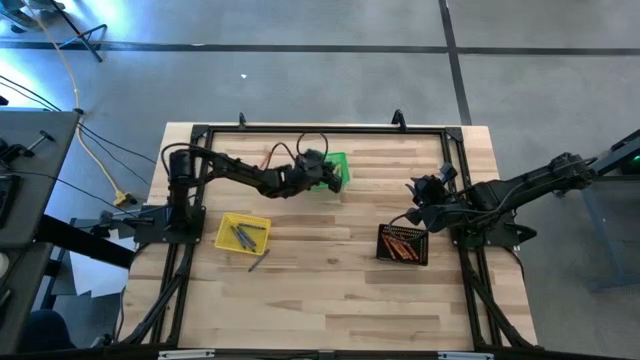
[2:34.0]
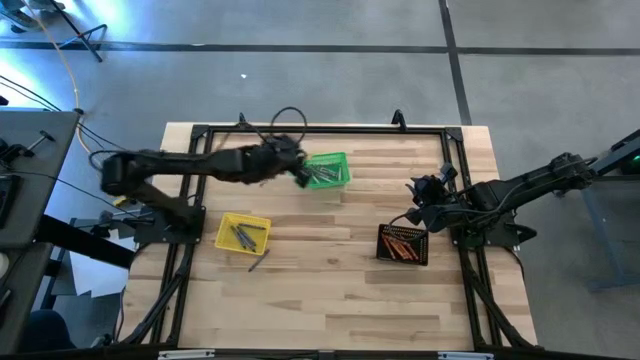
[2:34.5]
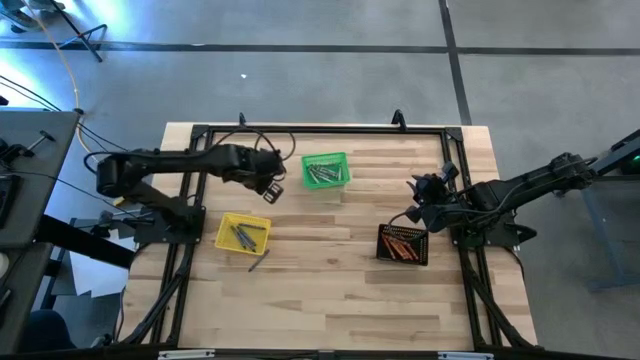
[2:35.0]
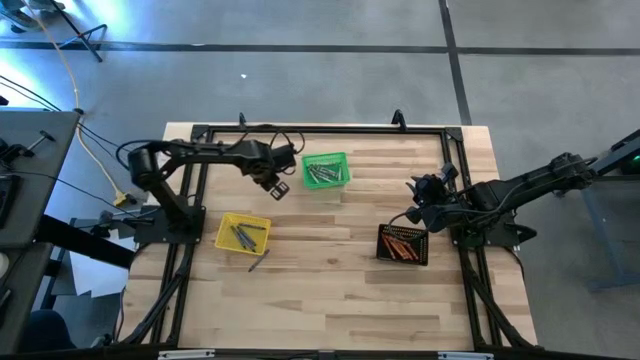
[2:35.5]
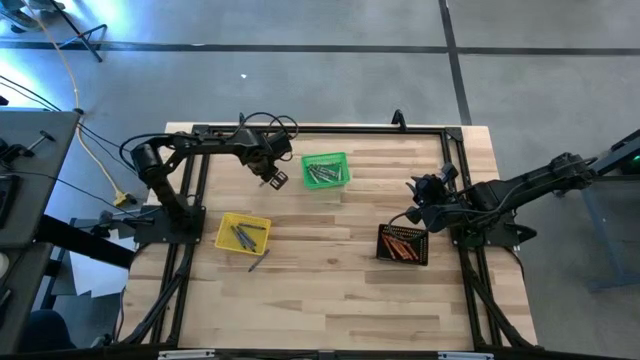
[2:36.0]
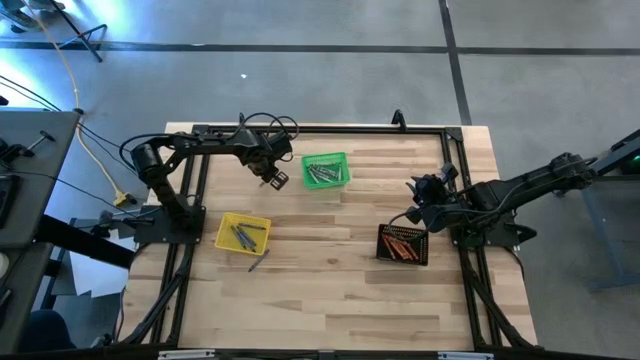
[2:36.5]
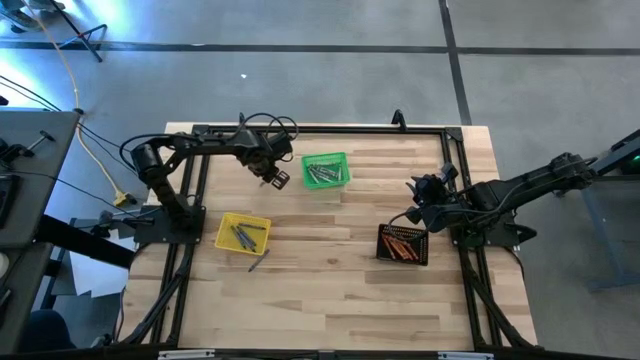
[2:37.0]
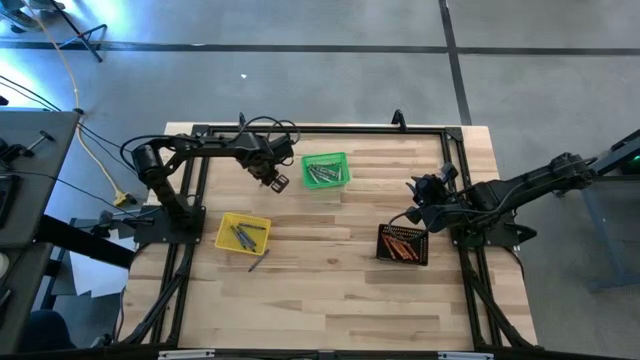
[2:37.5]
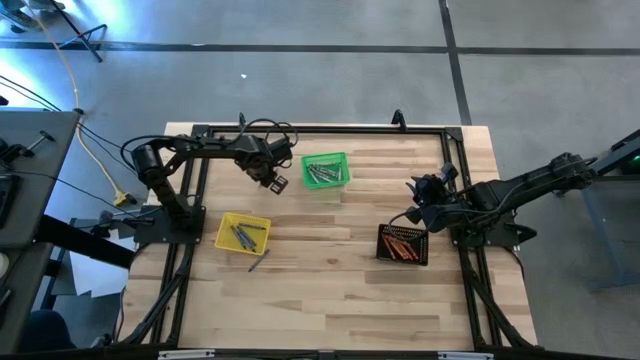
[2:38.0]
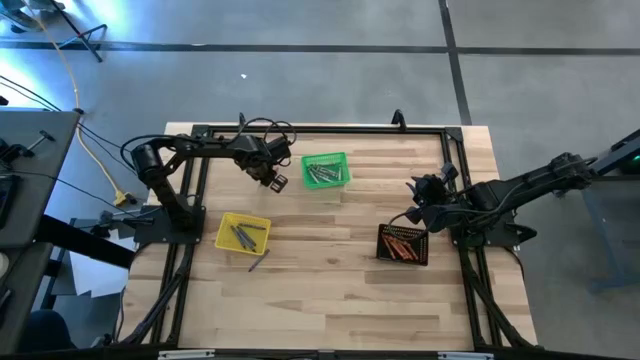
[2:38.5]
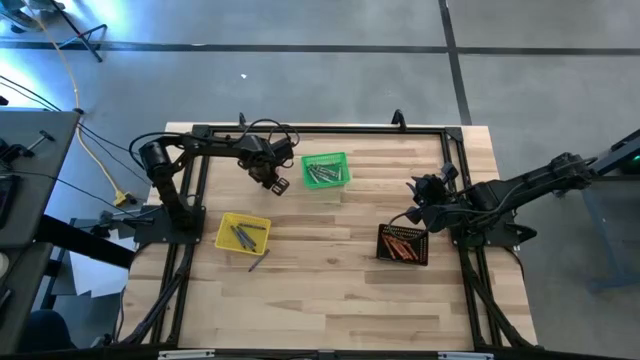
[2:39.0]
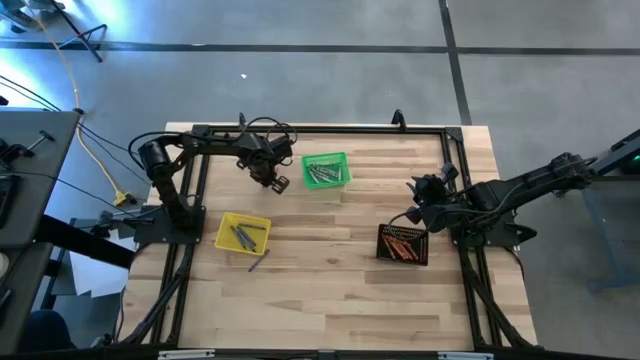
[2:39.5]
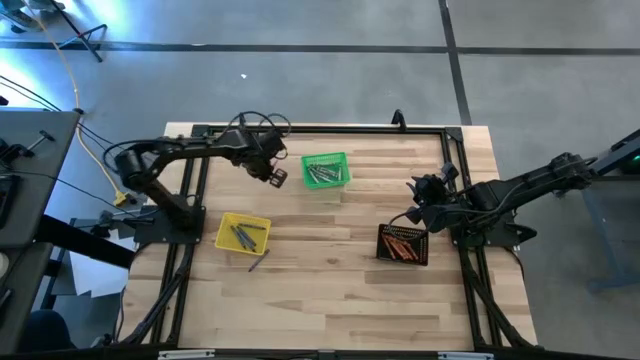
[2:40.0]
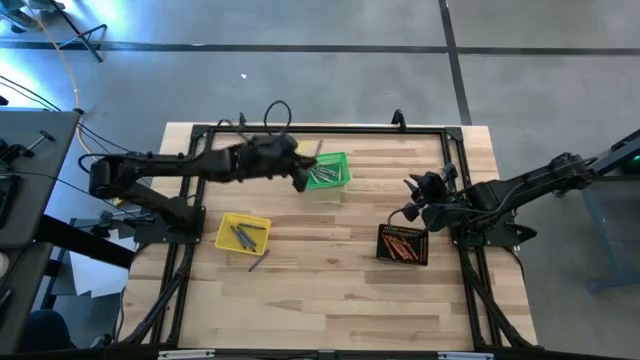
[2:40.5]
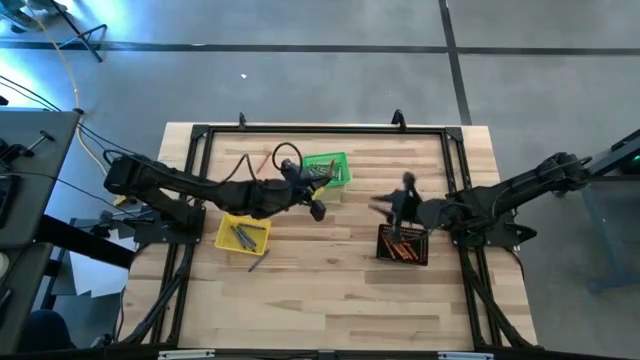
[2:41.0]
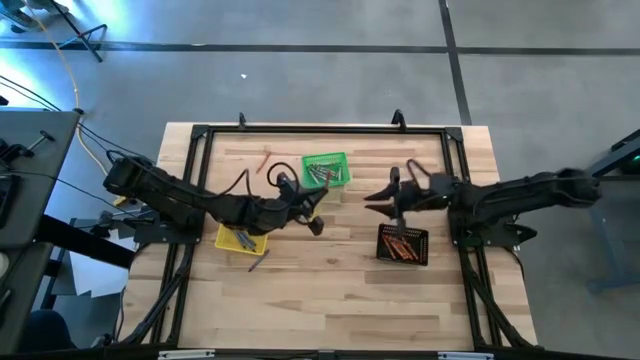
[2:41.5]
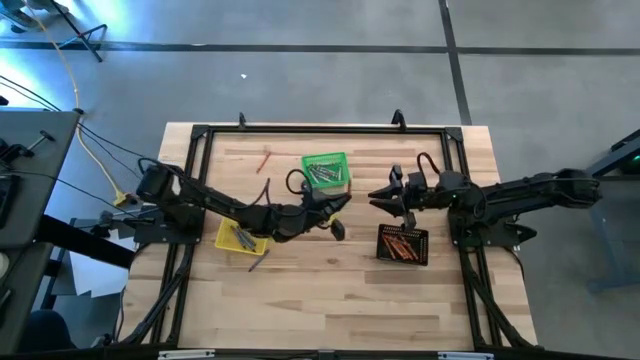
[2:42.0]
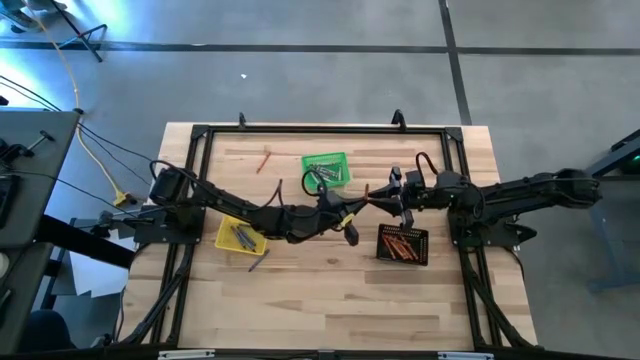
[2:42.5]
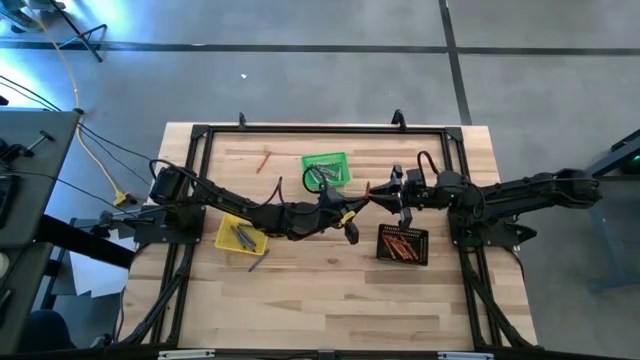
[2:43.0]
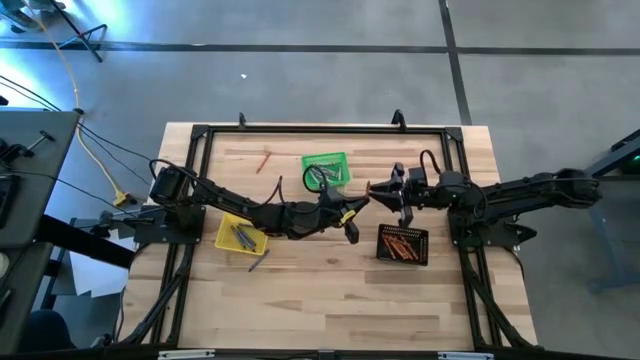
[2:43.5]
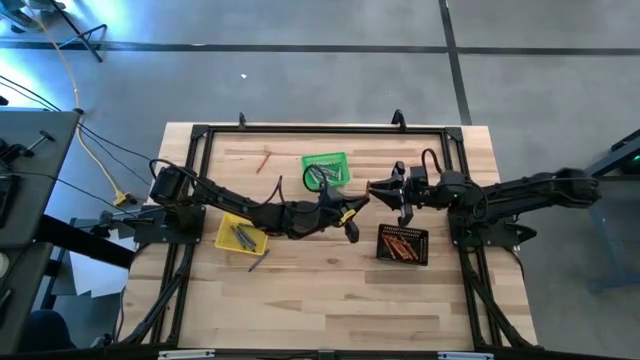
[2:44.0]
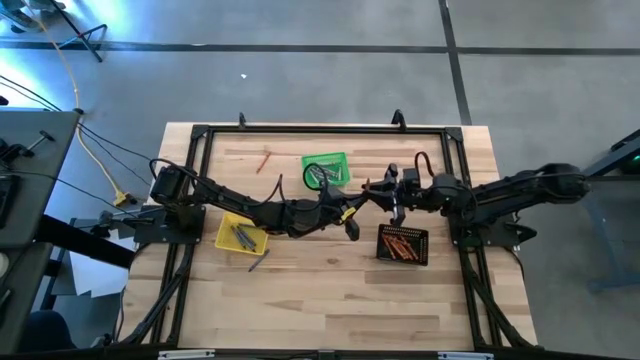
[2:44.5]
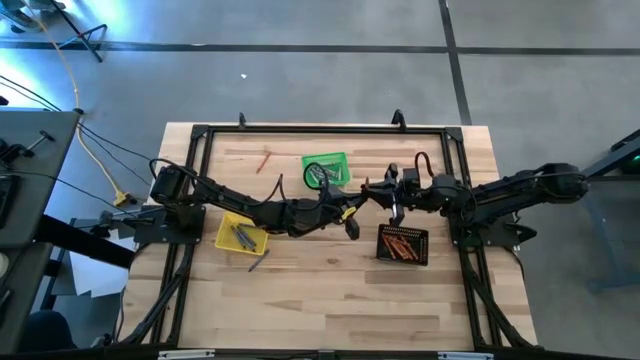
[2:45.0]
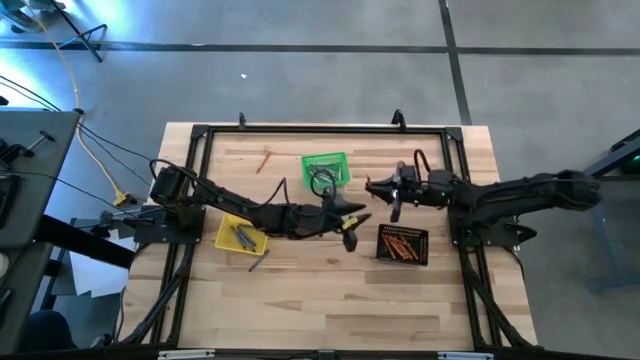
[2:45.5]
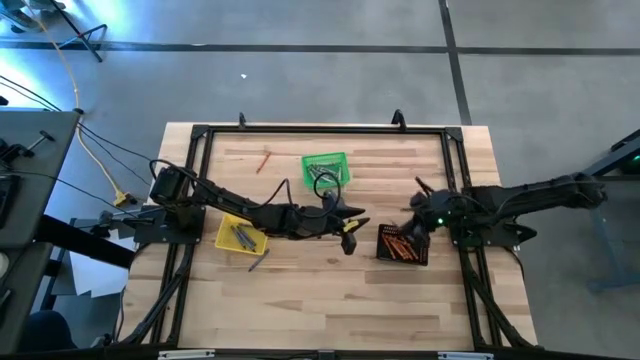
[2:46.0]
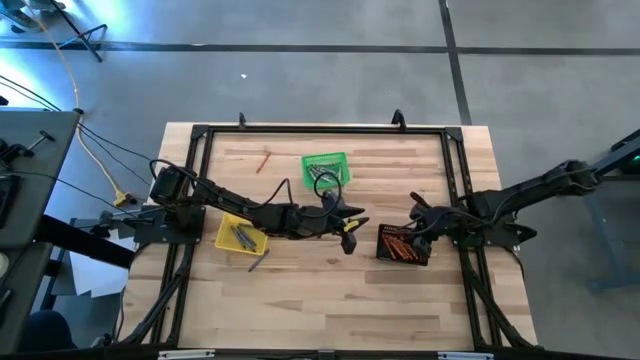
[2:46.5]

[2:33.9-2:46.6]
Task: Sort crayons
Put the orange crayon into the black basket

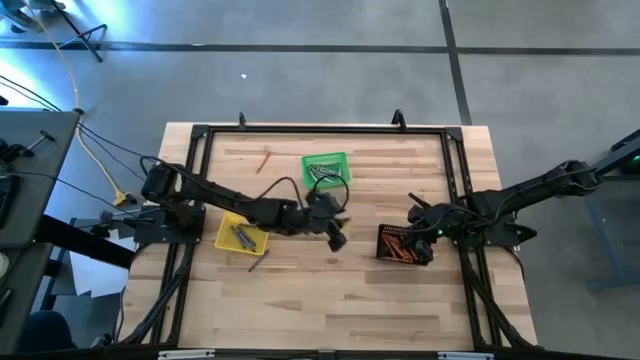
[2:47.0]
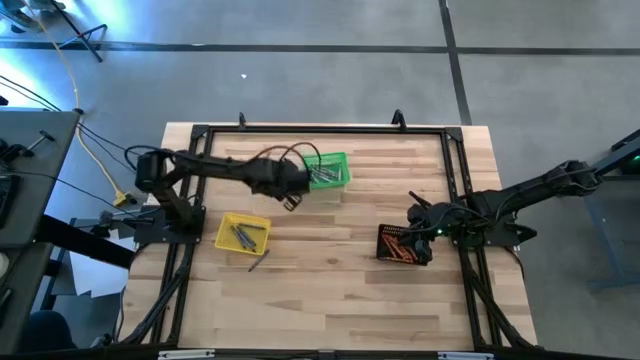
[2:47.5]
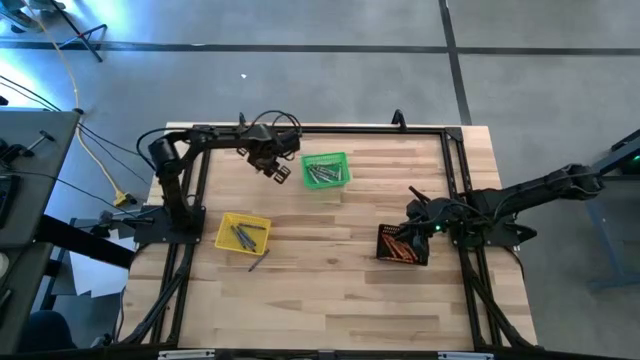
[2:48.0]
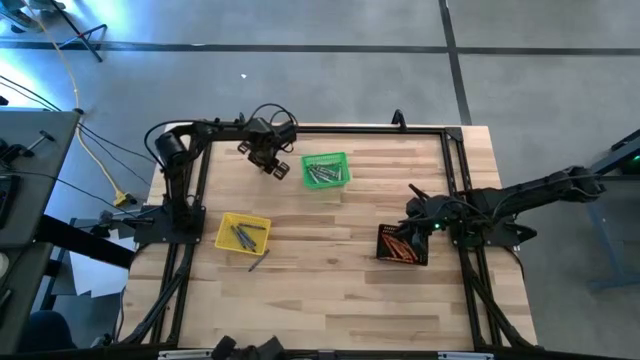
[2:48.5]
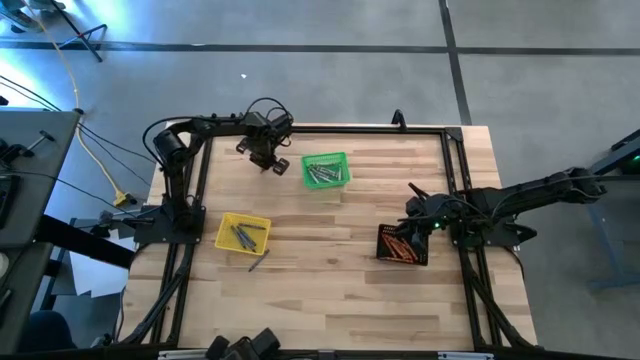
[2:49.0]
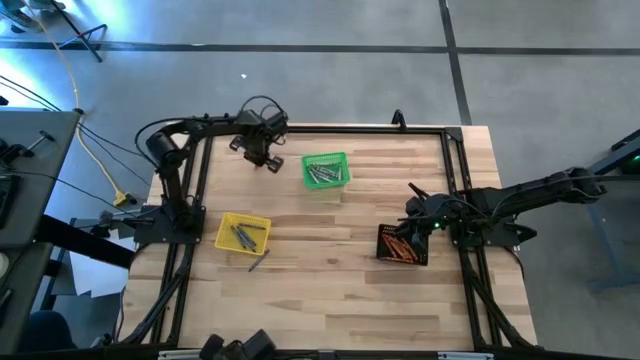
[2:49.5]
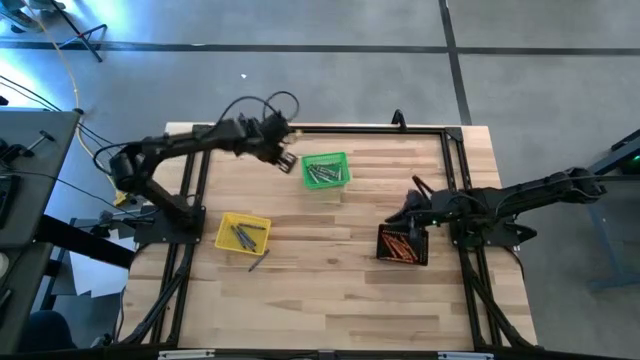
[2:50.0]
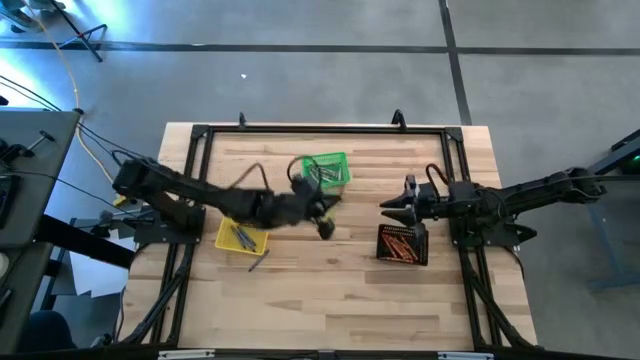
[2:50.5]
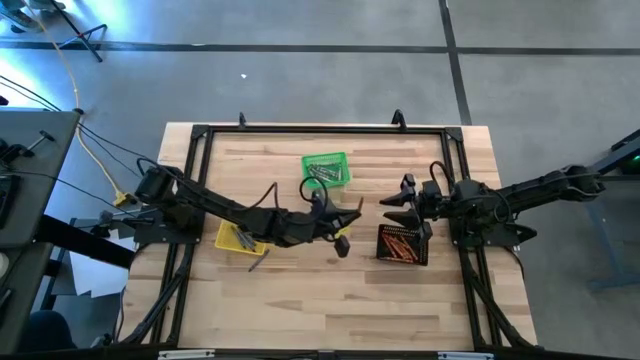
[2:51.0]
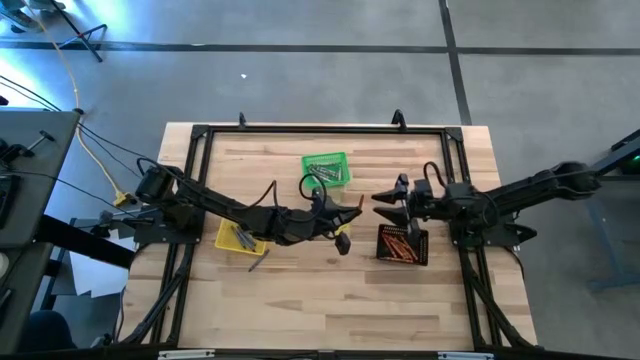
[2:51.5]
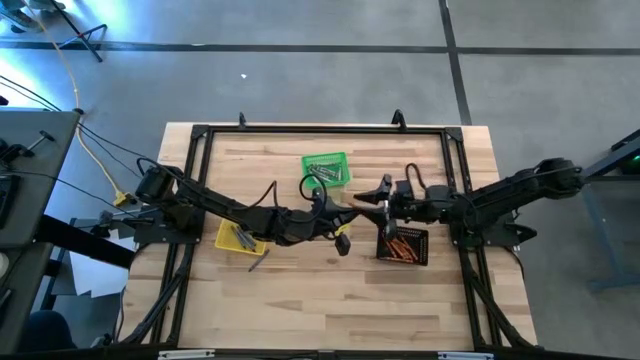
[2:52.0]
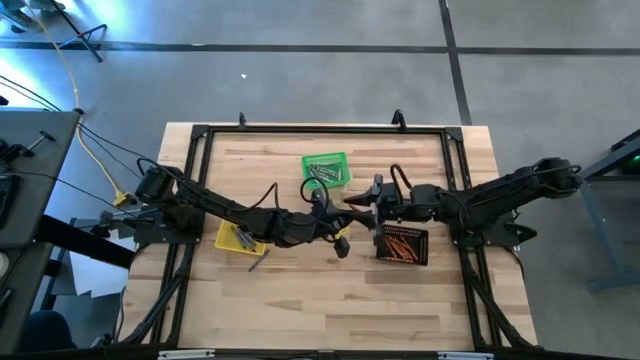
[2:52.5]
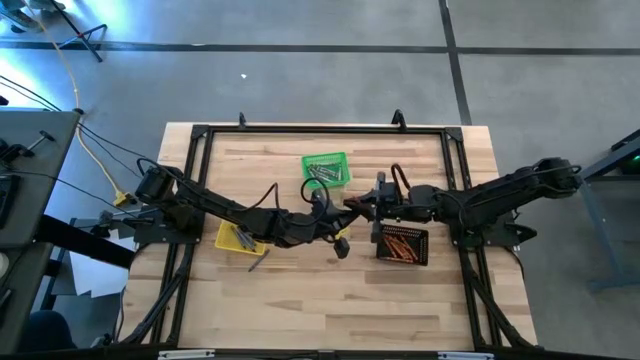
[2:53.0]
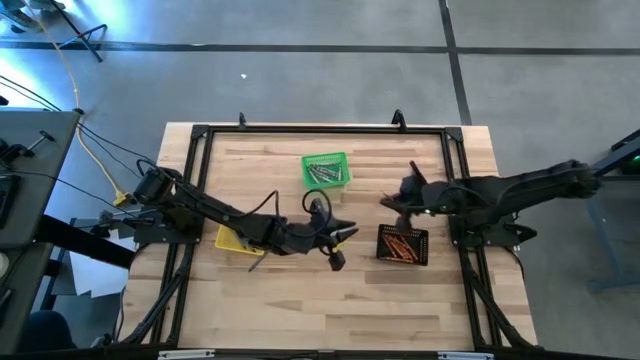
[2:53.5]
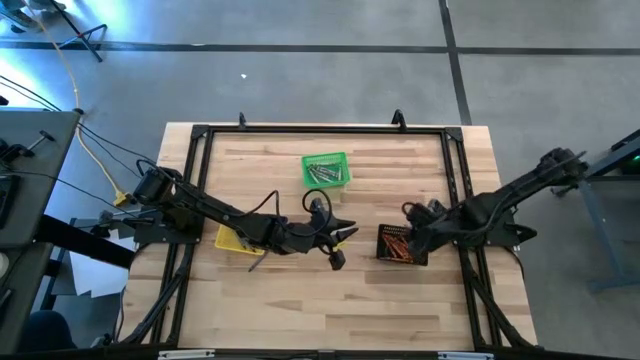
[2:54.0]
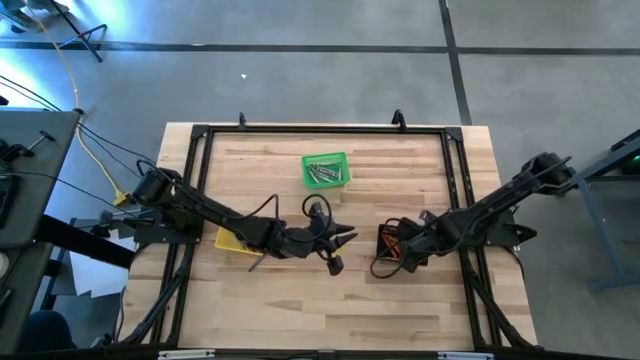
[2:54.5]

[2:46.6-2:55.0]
Put the orange crayon into the black basket

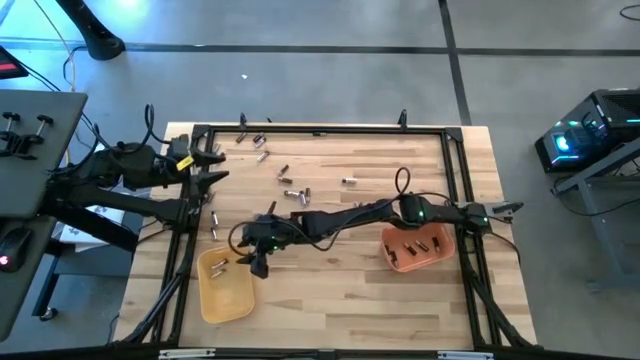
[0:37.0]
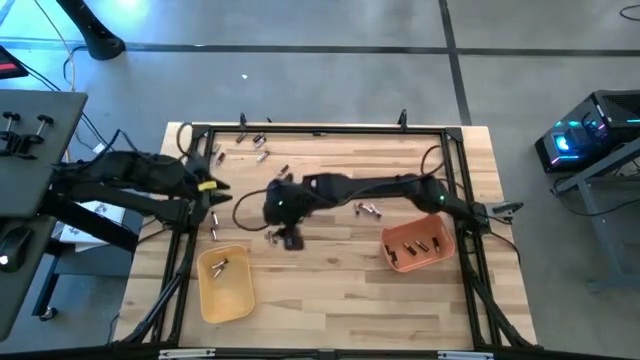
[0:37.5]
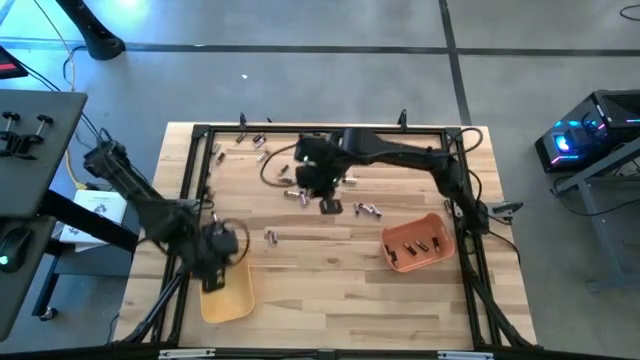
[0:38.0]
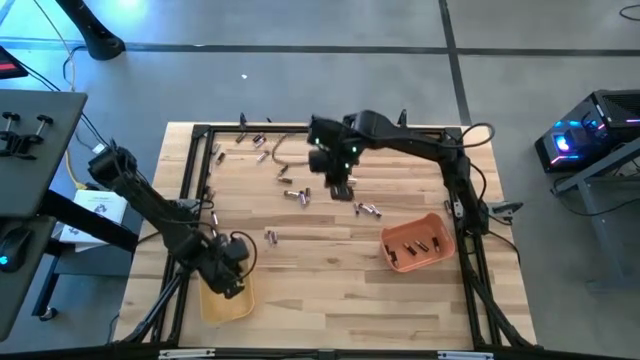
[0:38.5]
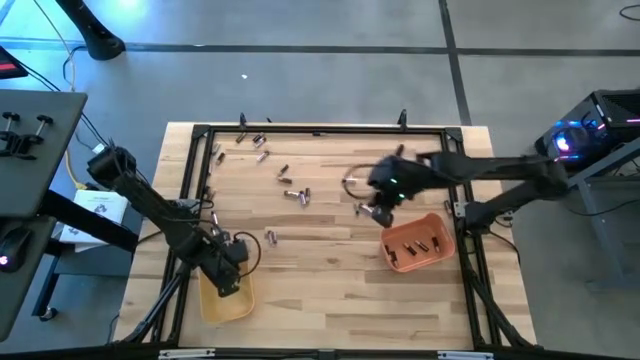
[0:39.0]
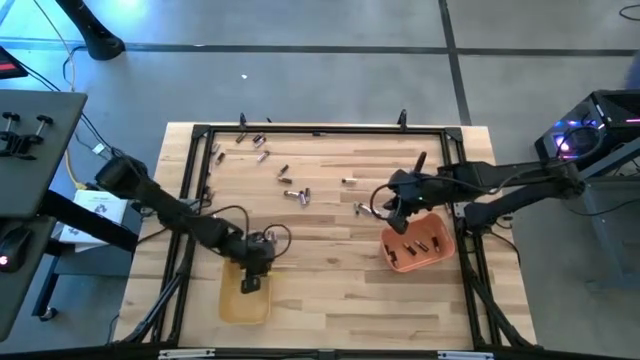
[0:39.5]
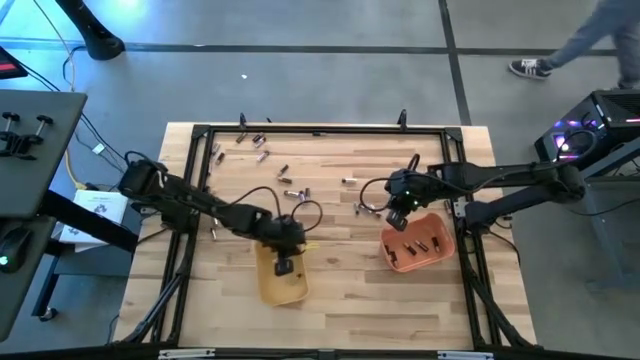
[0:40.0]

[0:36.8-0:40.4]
Task: Sort batteries
Move the yellow bin to the center of the table
